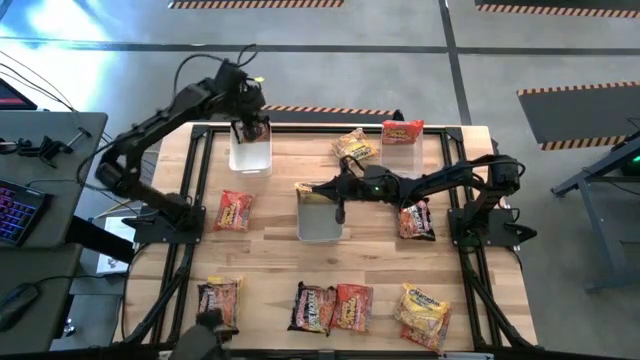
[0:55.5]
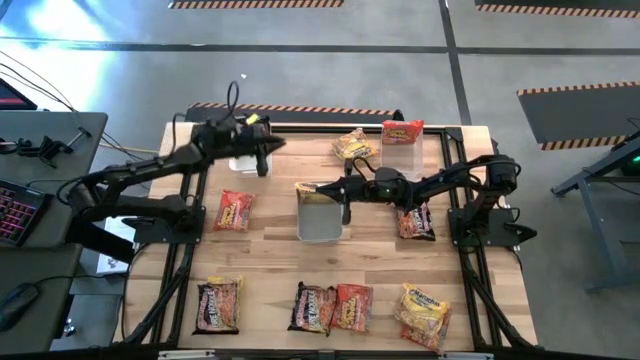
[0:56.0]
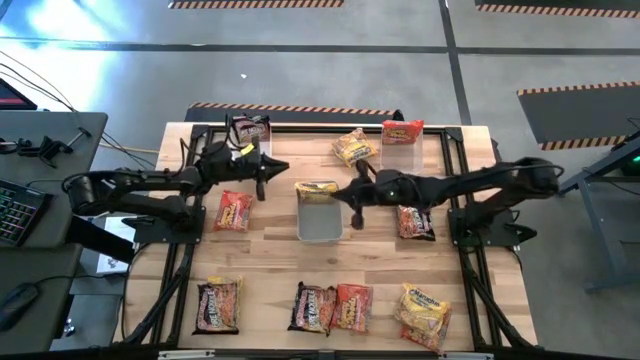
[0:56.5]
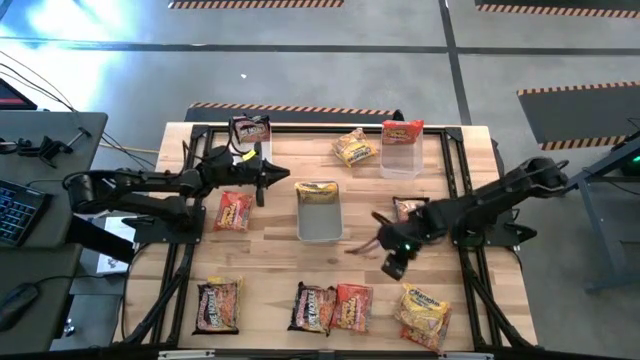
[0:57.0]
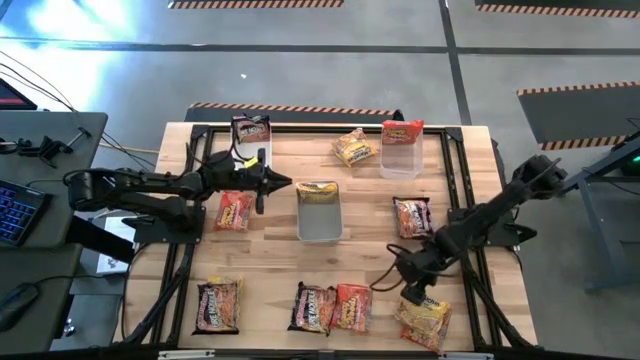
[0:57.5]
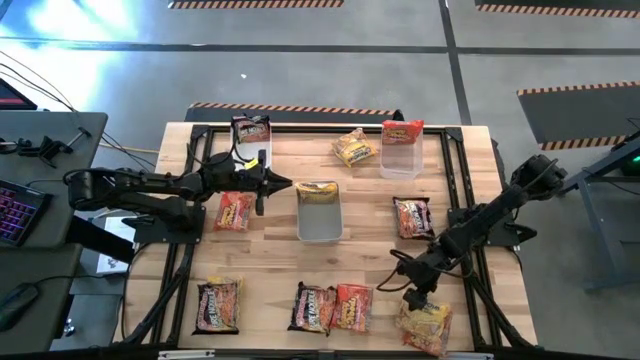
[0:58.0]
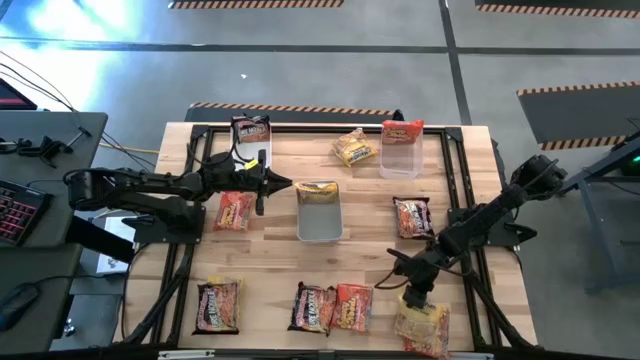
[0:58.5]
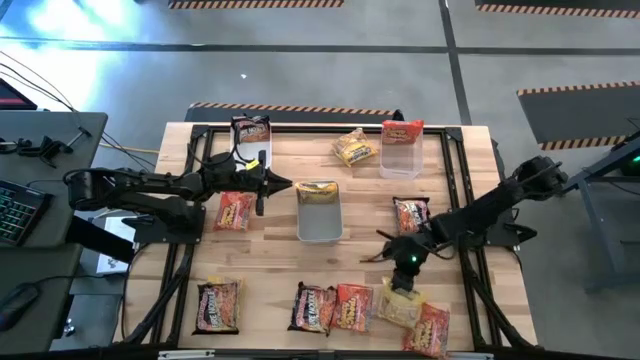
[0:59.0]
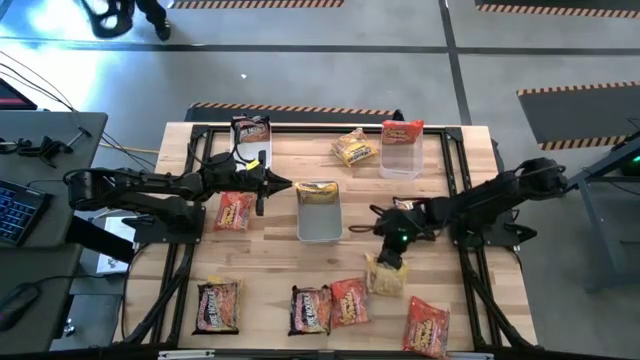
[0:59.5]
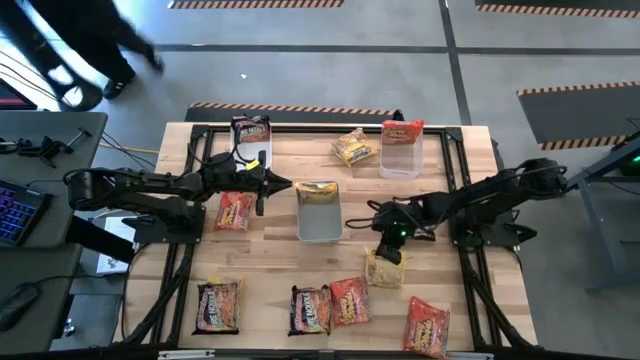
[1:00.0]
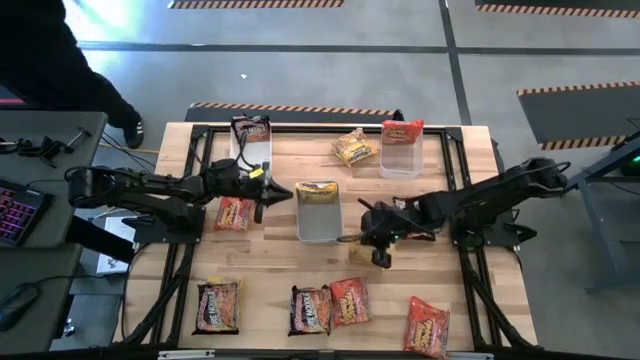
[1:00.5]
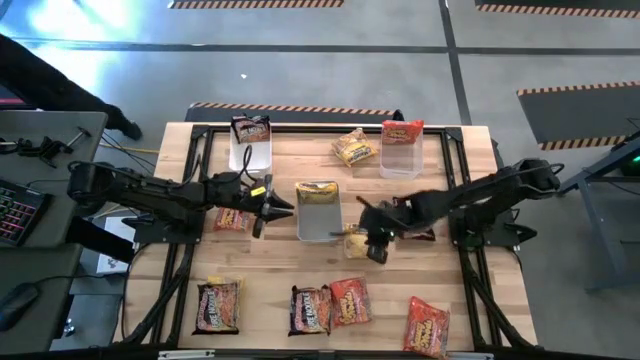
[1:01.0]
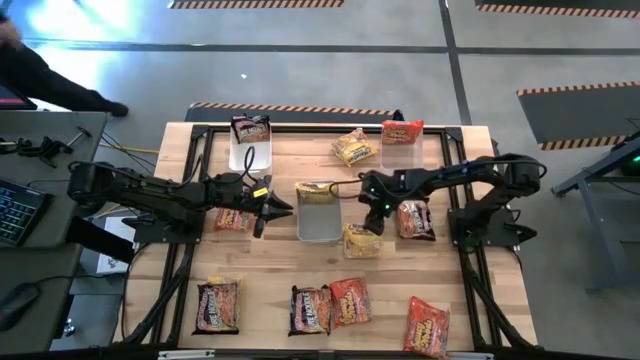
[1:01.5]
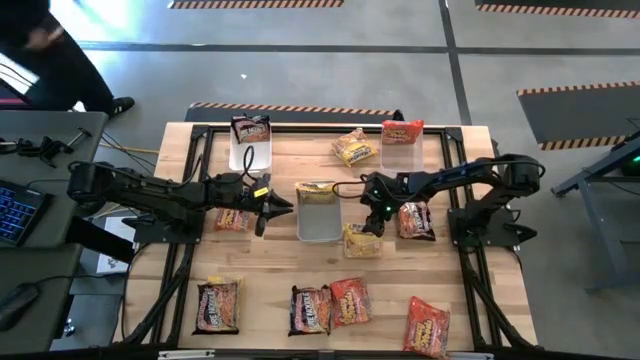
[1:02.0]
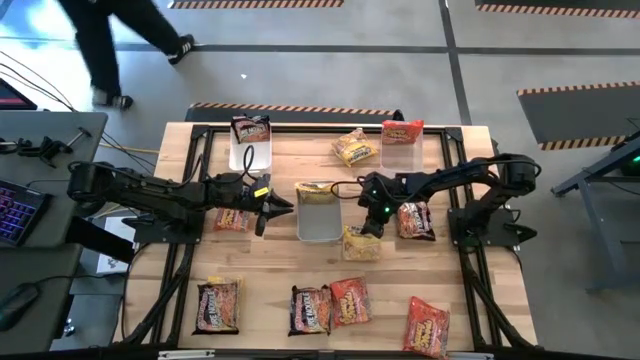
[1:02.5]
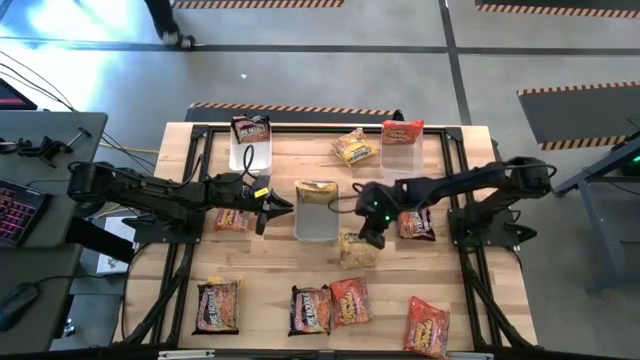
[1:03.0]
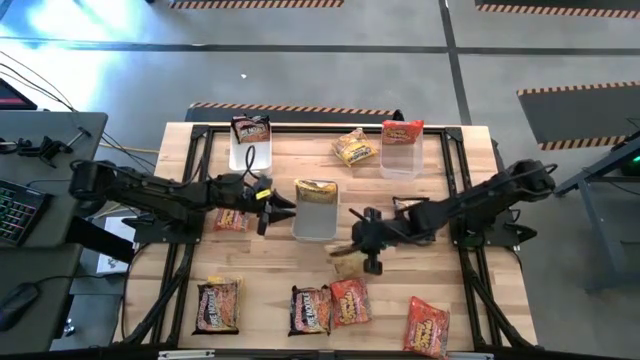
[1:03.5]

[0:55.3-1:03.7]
Task: Sort Maruchan noodles
Put the bottom right yellow noodle pack into the gray bin

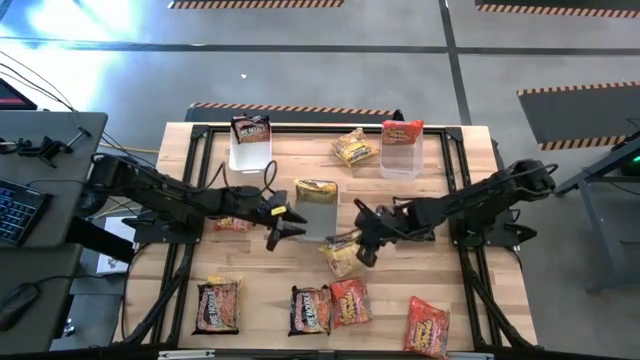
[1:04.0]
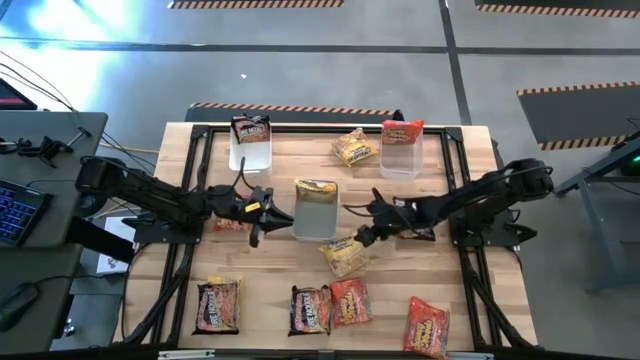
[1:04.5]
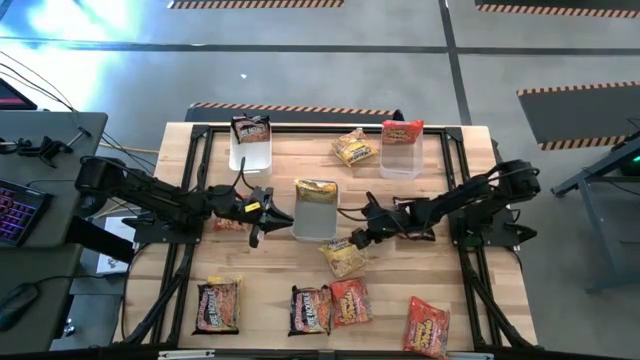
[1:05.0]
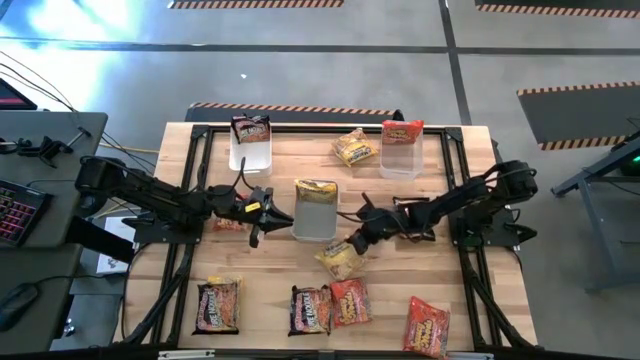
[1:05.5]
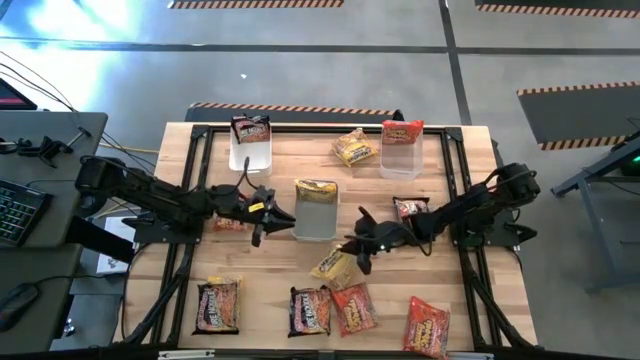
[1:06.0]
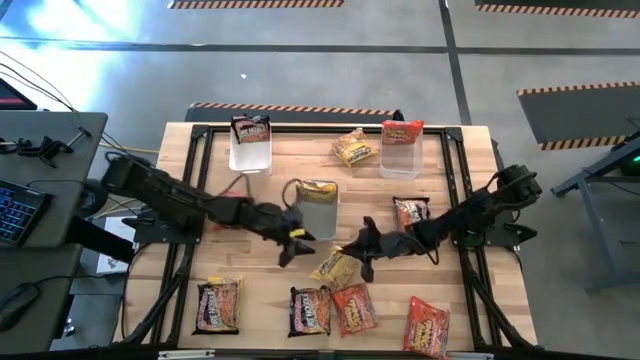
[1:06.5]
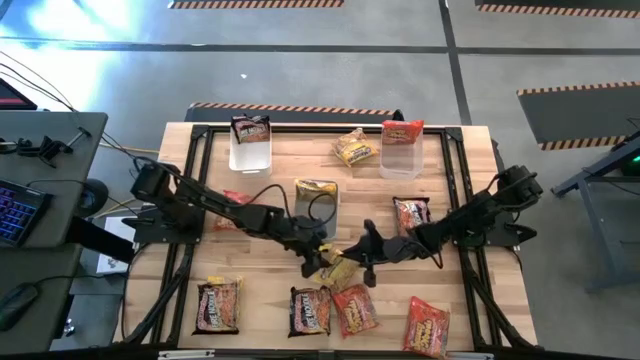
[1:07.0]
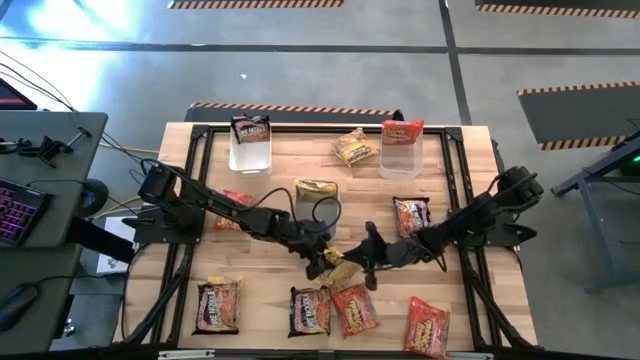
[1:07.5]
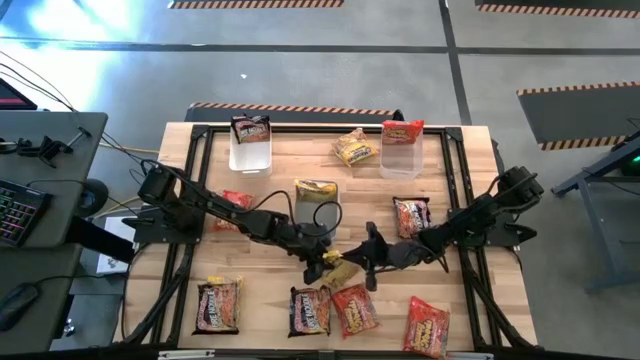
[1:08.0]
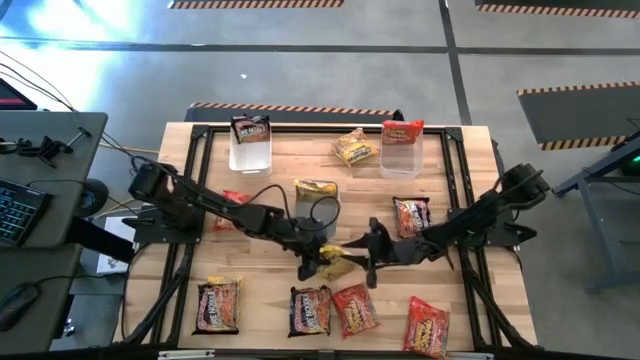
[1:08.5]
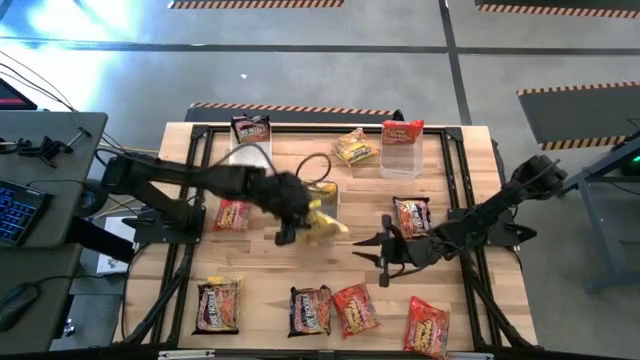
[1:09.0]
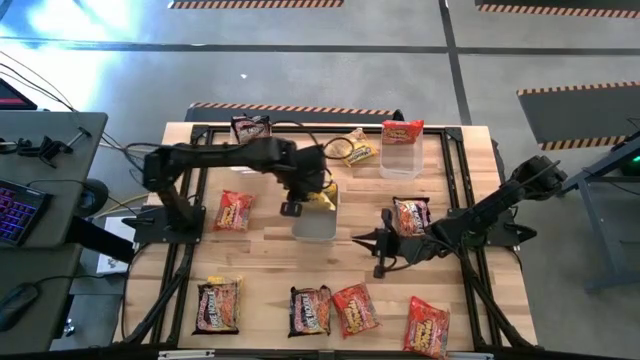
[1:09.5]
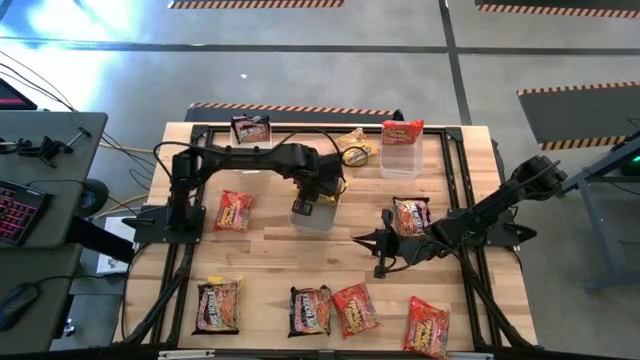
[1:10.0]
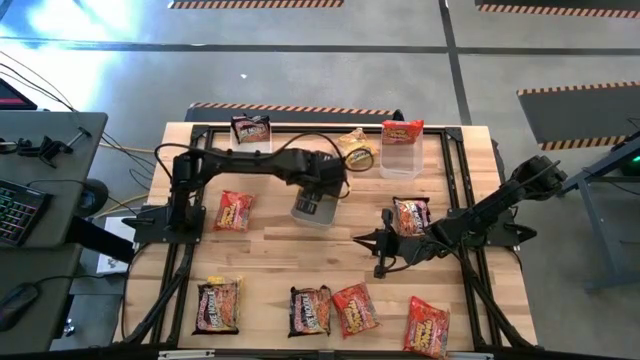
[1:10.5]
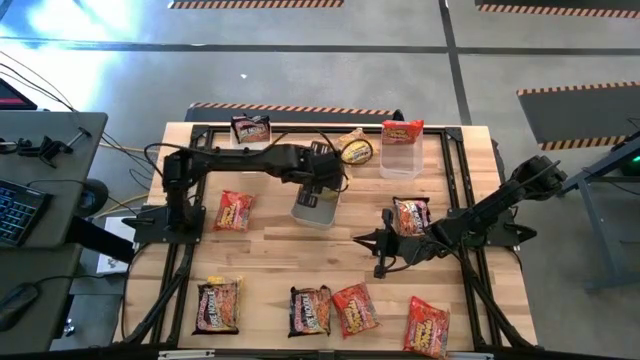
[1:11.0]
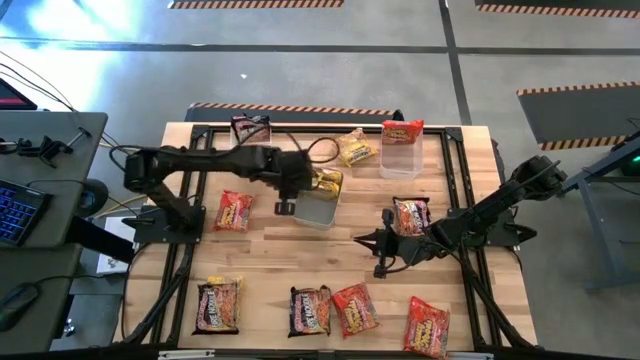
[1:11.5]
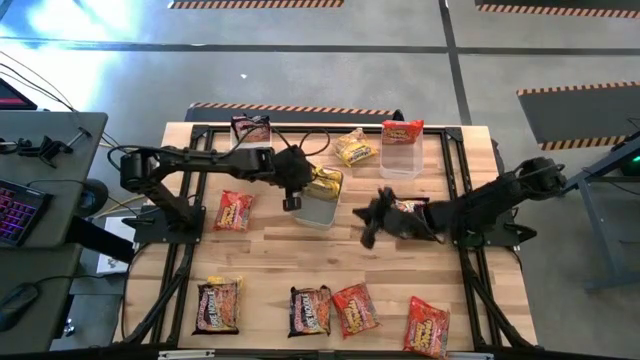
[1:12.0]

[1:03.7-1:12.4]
Put the bottom right yellow noodle pack into the gray bin

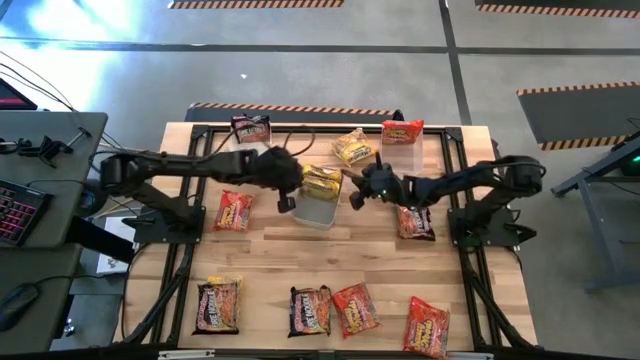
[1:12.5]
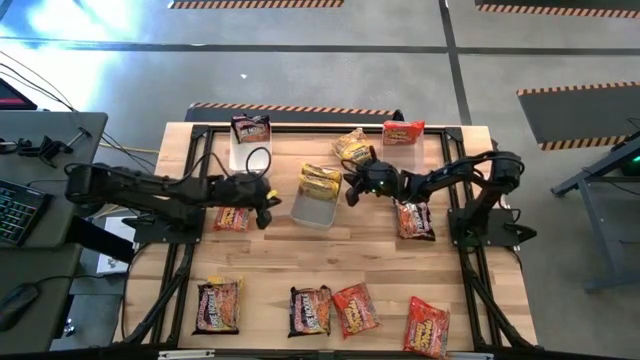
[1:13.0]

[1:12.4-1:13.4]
Adjust the gray bin

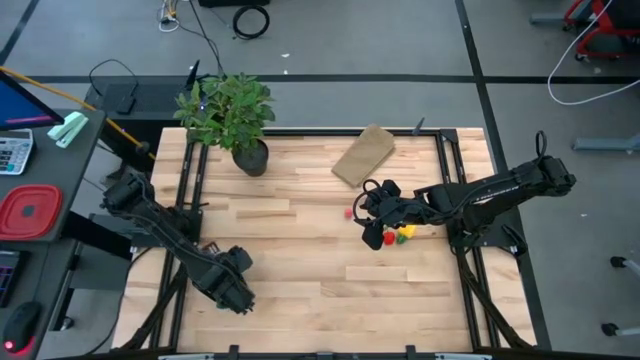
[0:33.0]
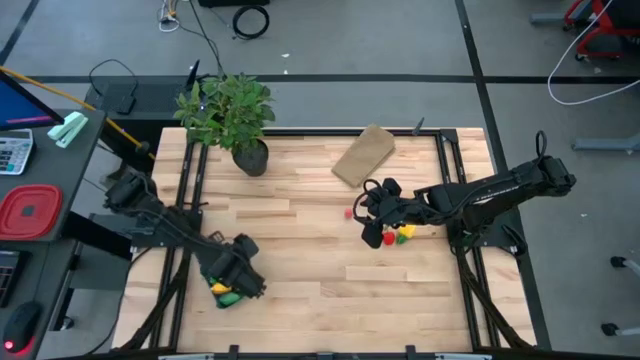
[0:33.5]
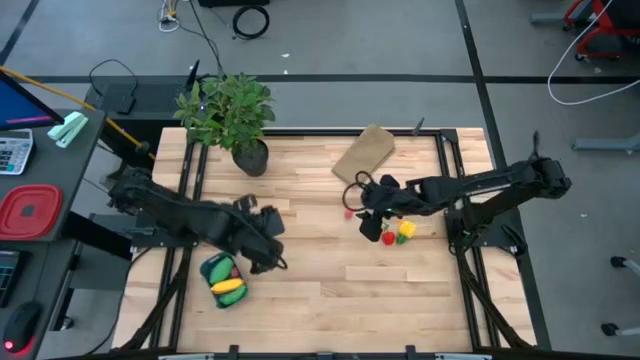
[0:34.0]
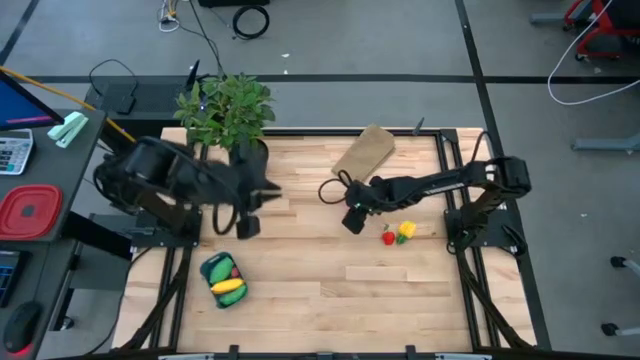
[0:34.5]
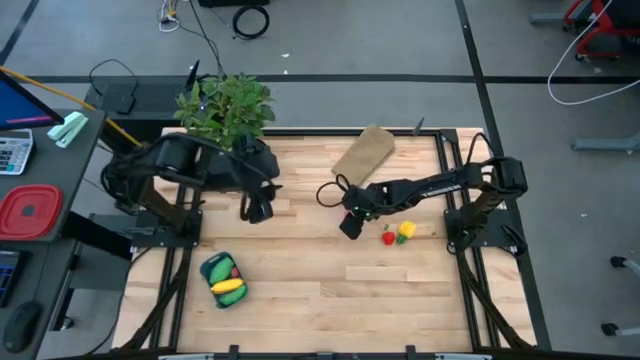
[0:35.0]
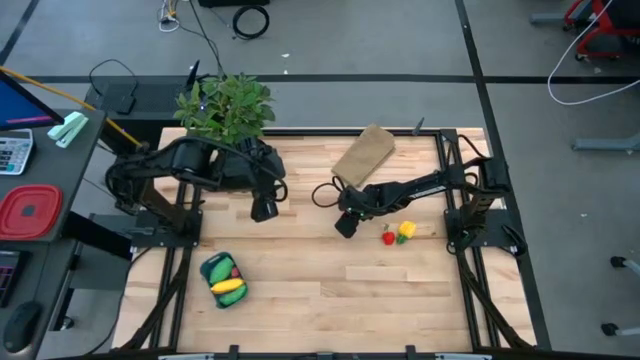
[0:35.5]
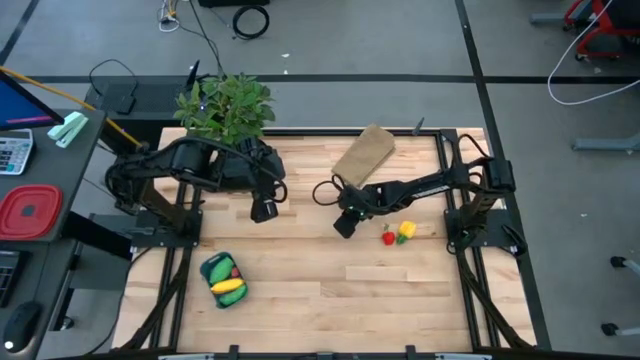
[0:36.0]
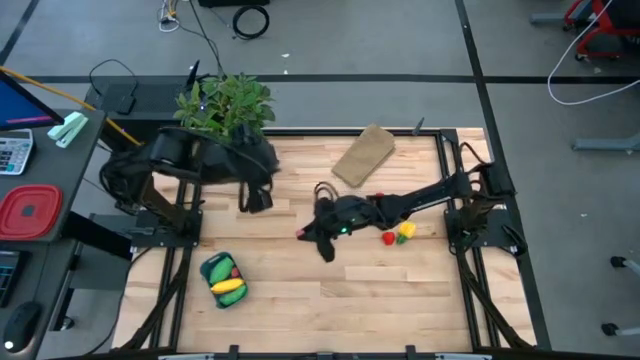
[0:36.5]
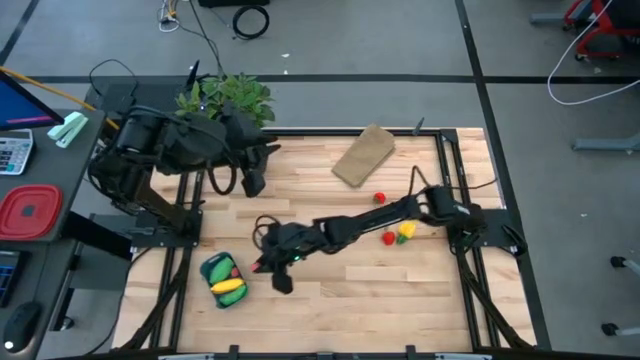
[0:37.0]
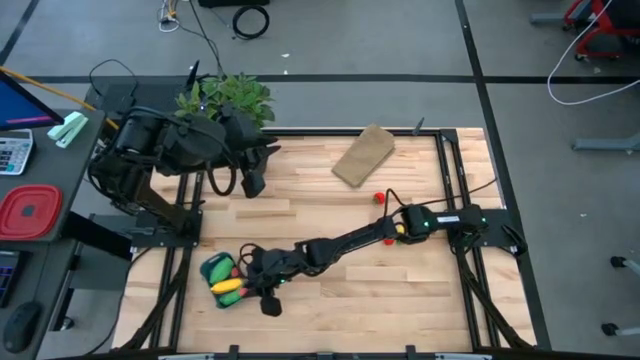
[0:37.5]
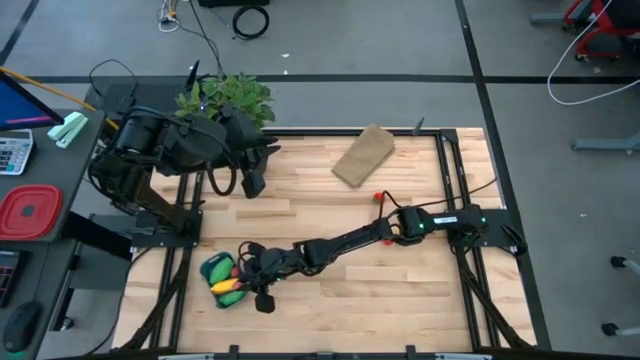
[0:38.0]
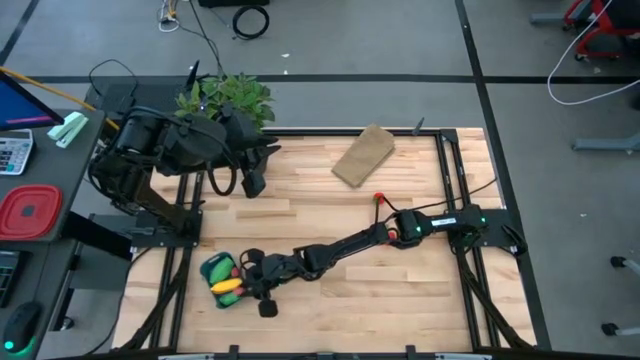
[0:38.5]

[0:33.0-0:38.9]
Task: Pick and placing Produce into tupperware
Put the pink peach into the blue bin
